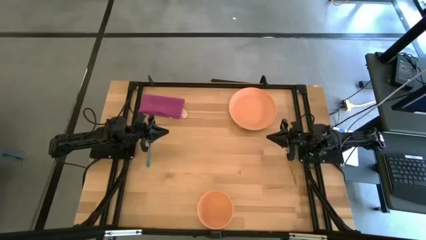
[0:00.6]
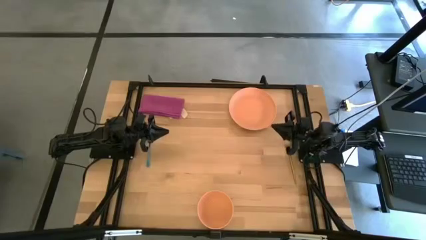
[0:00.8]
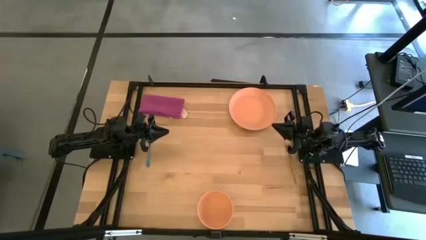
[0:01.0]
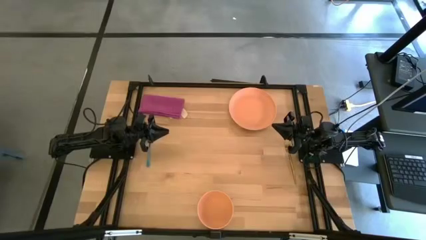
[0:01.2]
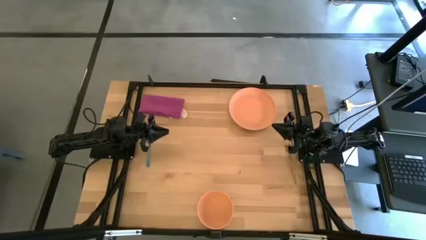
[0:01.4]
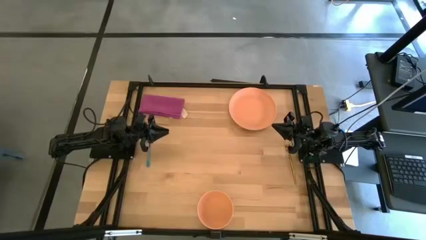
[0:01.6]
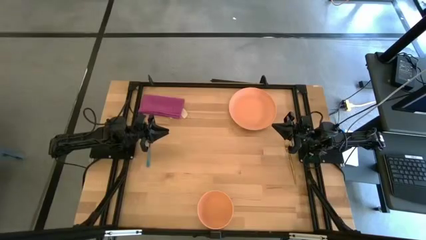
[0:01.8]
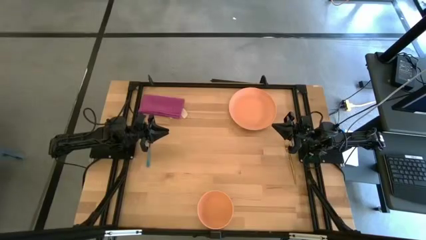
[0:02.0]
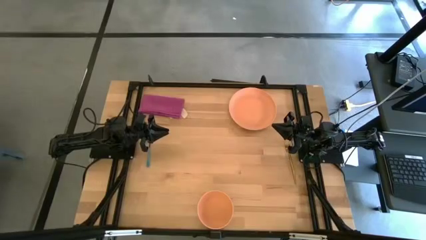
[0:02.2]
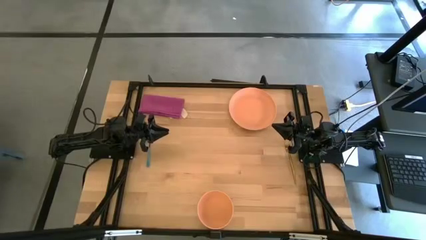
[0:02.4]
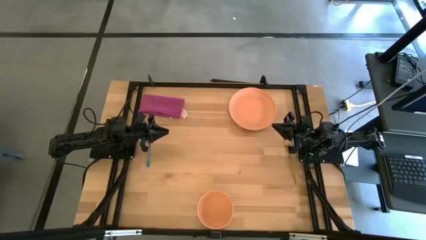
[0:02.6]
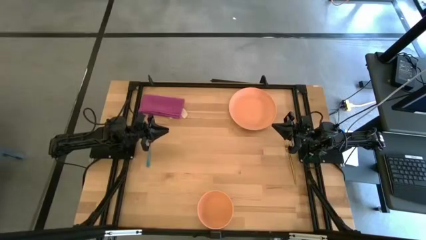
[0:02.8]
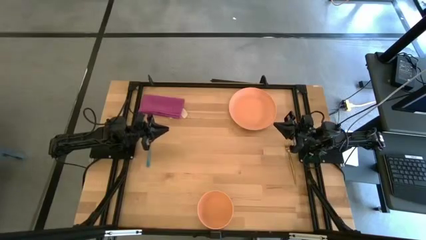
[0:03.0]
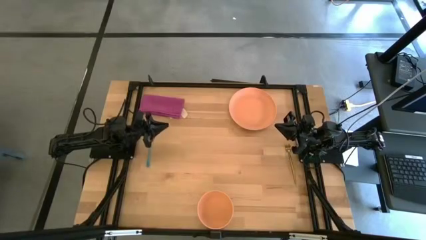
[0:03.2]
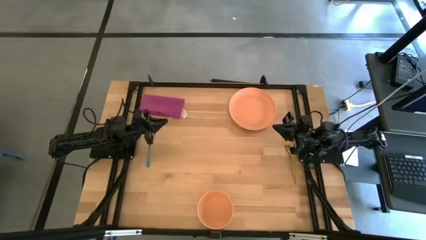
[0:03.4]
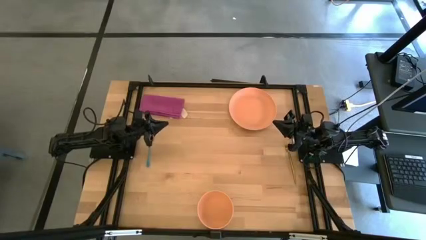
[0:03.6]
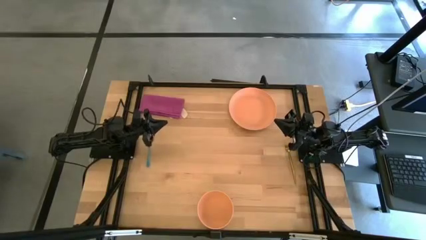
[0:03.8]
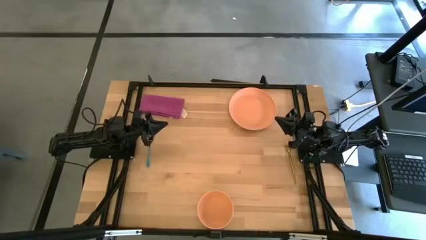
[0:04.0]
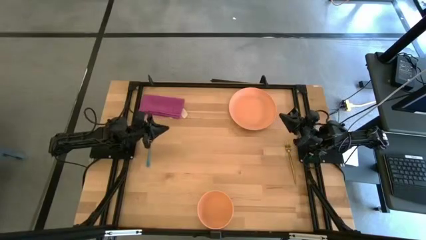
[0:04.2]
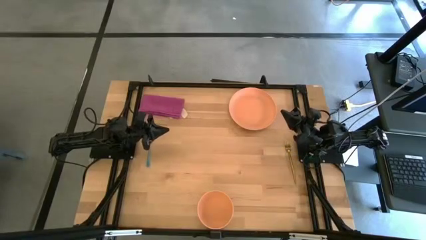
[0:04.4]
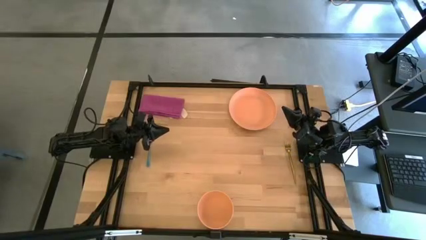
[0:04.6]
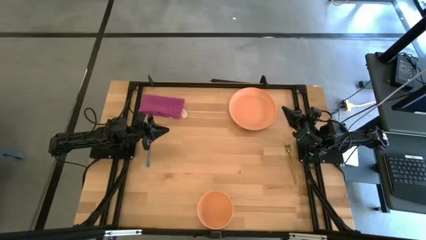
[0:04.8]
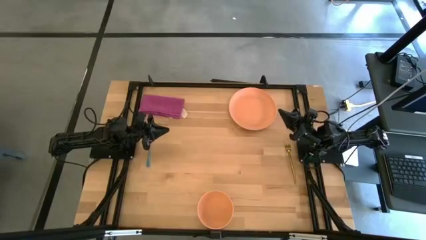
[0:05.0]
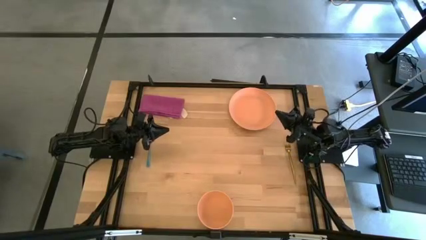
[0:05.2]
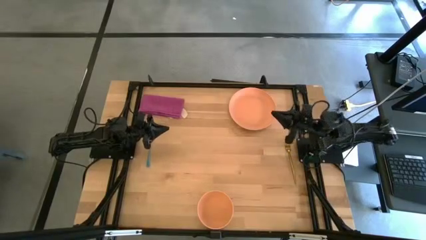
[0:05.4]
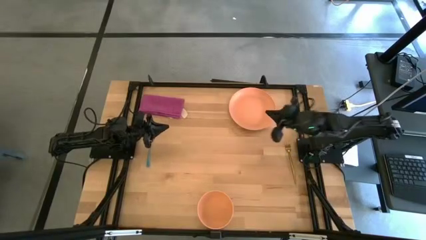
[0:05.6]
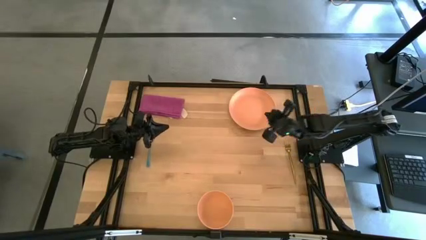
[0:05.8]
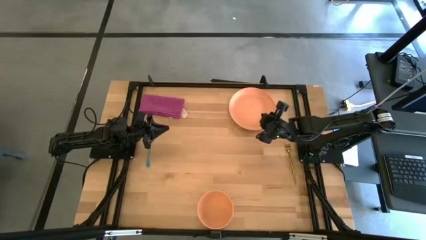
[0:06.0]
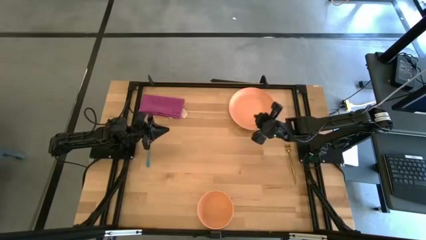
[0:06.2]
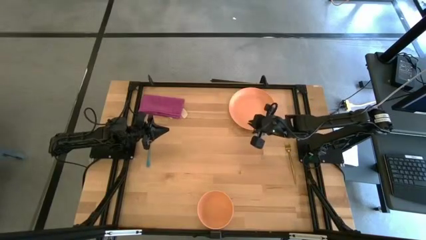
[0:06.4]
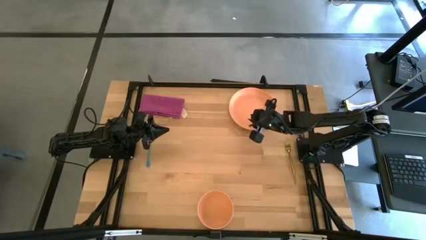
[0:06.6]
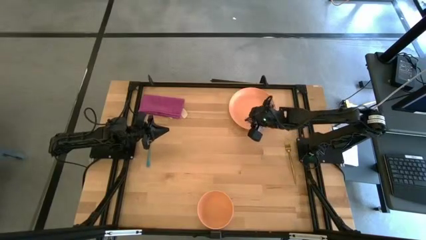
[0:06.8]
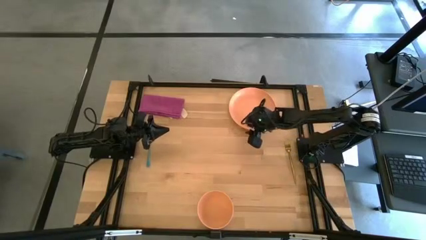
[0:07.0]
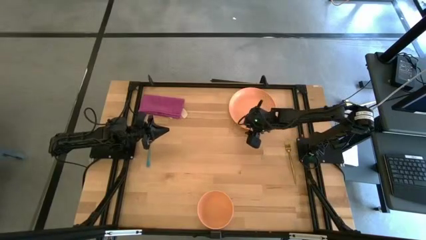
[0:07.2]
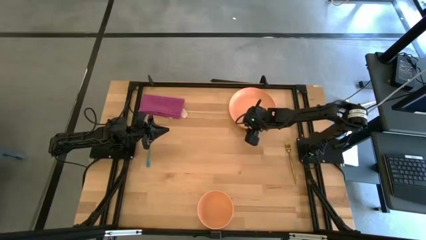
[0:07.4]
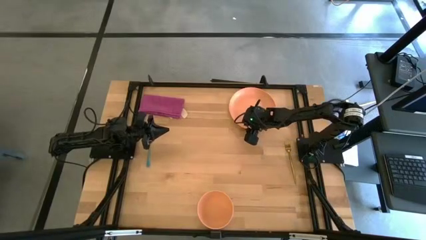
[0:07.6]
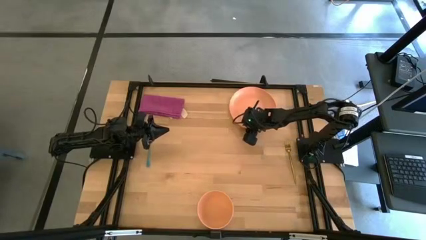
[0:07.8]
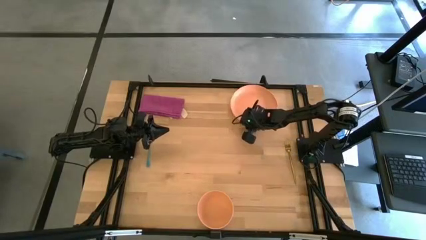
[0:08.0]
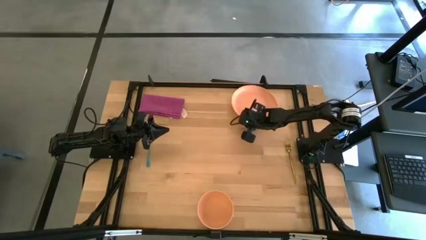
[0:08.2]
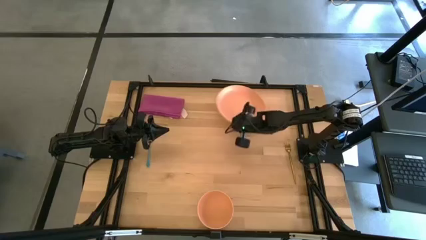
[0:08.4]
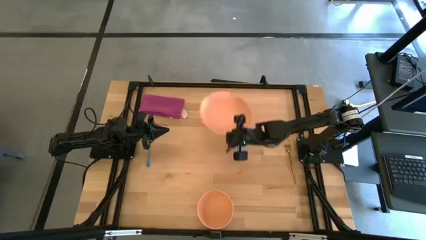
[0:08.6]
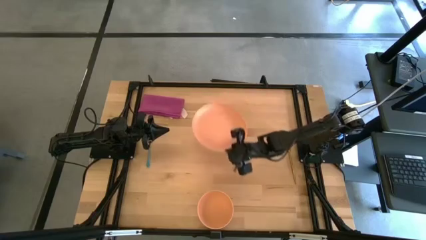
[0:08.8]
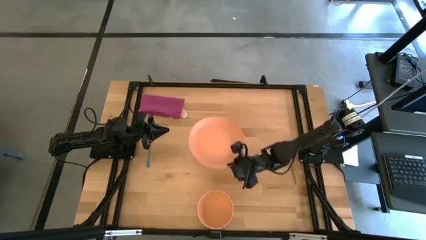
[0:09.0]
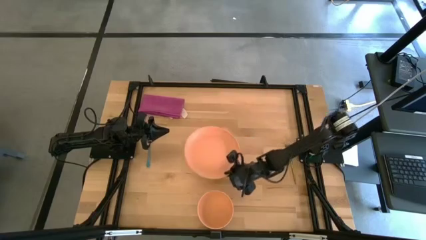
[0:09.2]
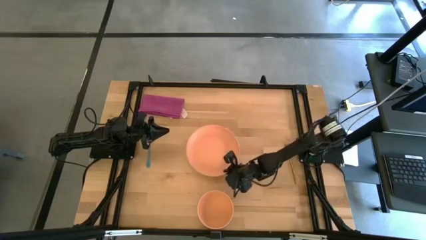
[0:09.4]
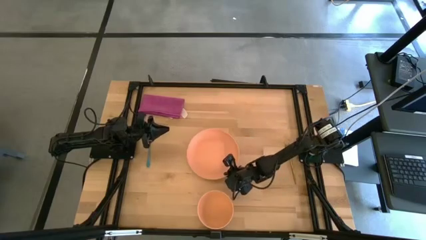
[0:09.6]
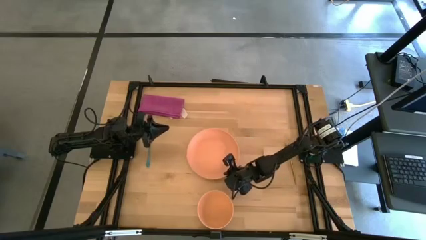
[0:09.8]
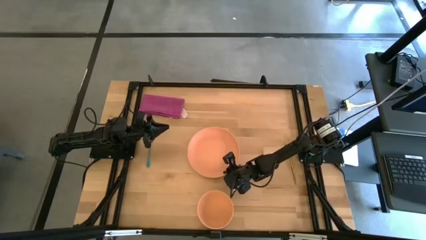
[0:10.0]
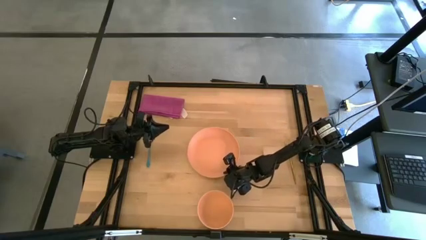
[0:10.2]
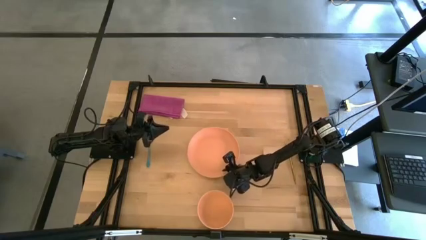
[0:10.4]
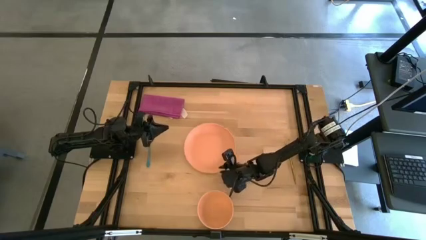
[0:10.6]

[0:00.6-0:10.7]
Task: Set table place
Move the light orange plate to the center of the table

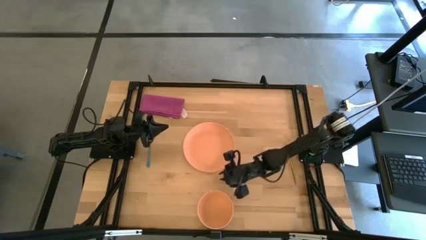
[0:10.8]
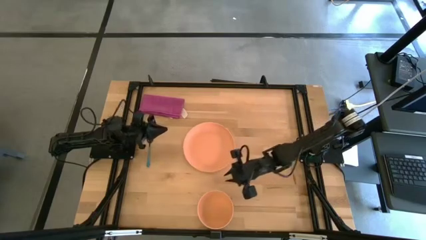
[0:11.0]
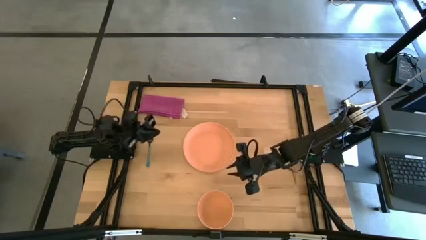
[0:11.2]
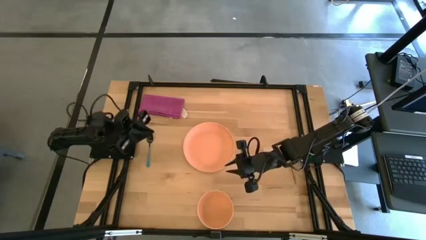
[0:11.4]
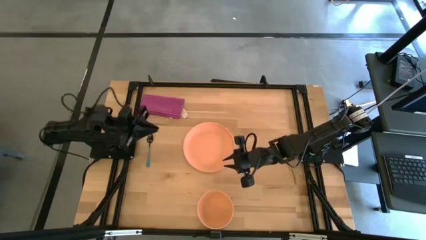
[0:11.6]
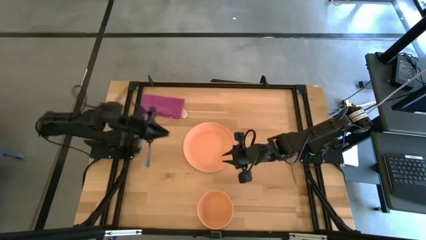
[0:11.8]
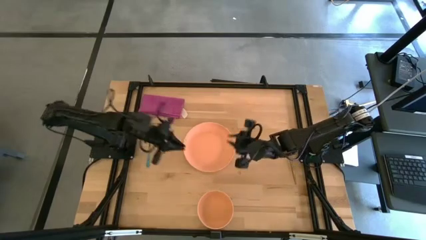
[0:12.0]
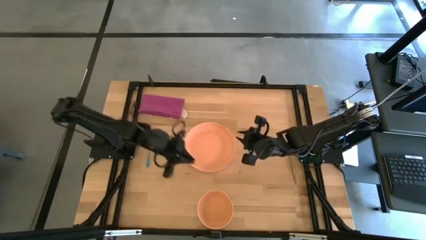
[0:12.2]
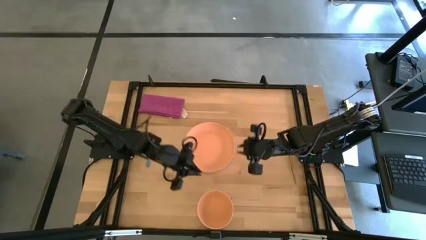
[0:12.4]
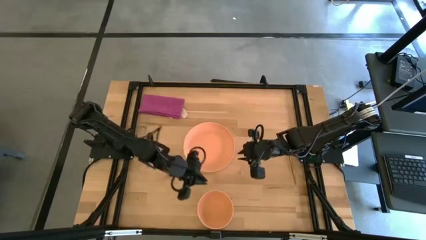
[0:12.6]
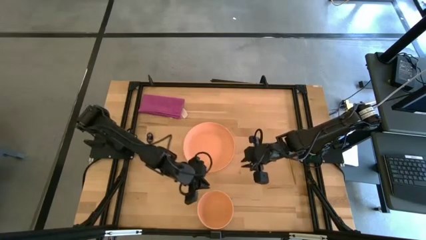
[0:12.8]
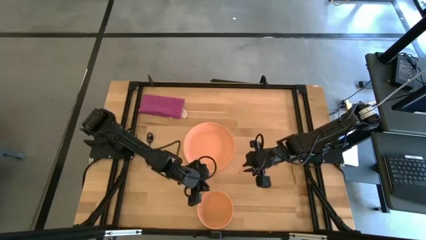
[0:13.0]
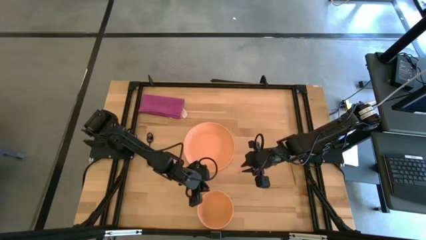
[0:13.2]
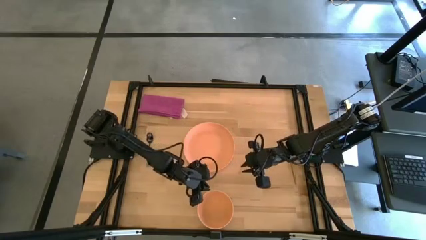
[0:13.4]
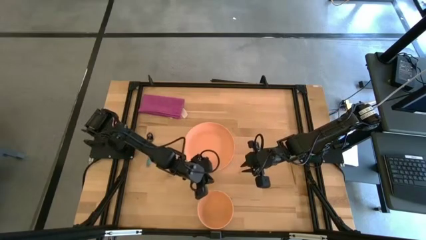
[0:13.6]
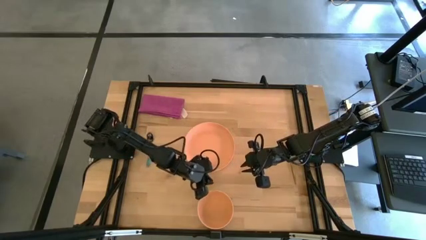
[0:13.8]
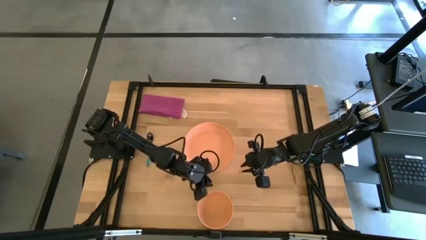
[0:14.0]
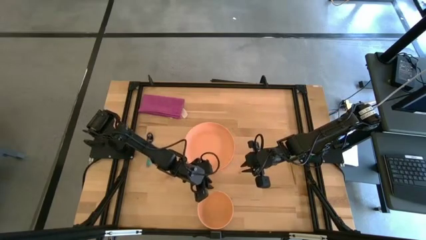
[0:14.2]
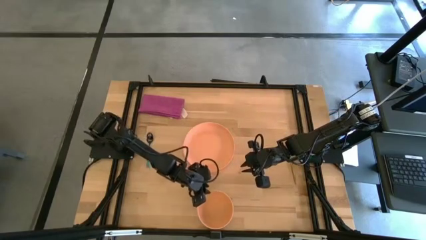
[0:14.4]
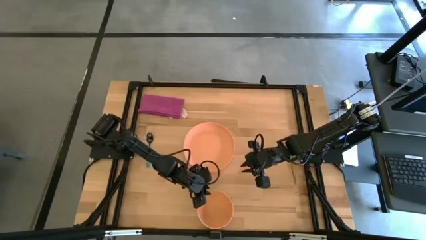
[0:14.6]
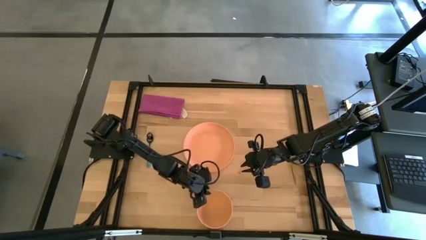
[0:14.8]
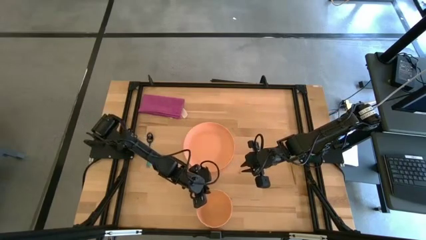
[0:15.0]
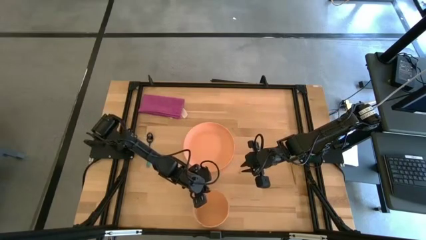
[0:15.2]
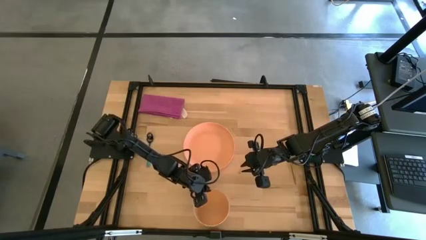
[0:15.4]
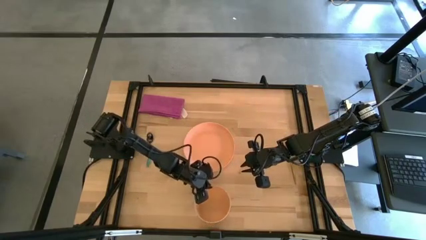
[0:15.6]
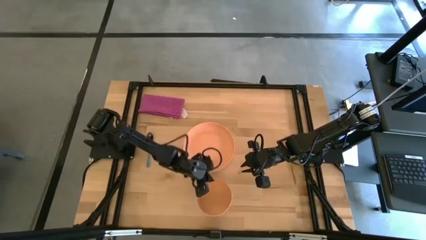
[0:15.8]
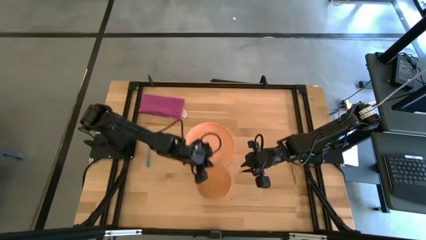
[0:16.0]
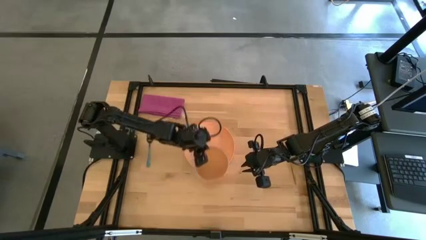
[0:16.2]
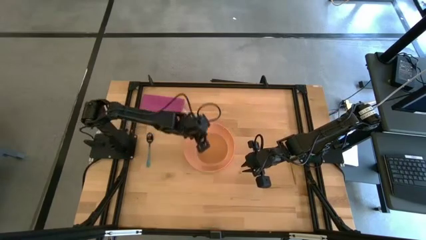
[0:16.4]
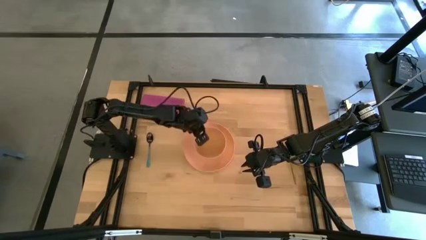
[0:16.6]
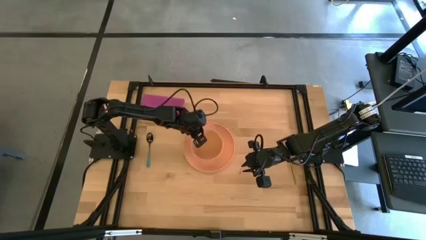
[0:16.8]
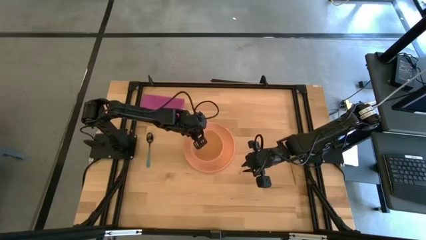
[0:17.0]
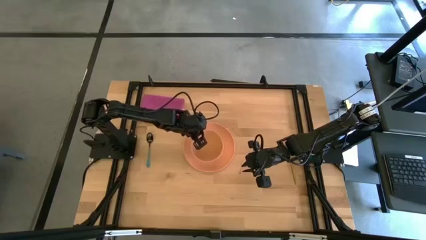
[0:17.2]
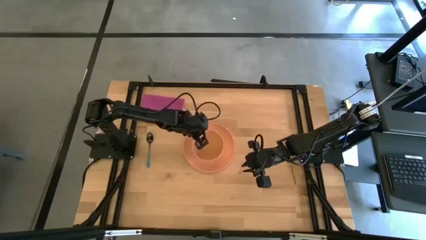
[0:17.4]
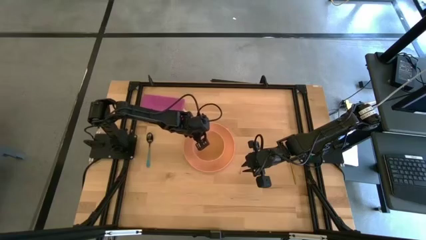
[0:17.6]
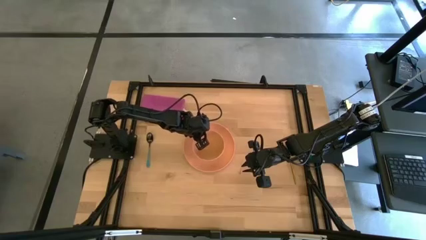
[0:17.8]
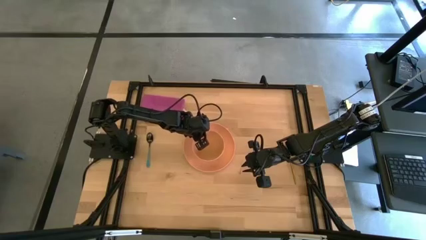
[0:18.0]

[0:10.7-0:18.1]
Put the light orange bowl on top of the light orange plate
